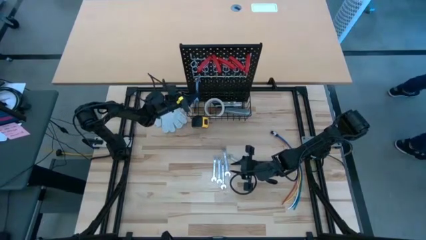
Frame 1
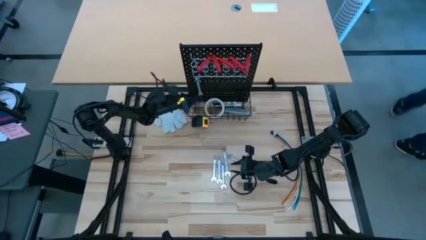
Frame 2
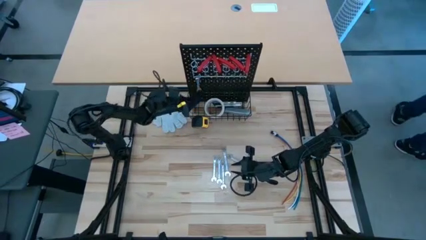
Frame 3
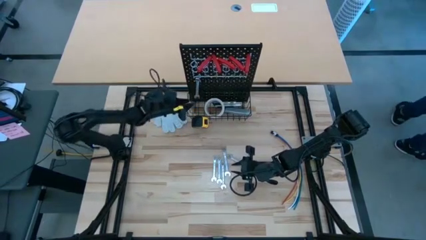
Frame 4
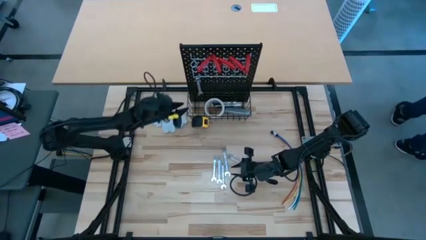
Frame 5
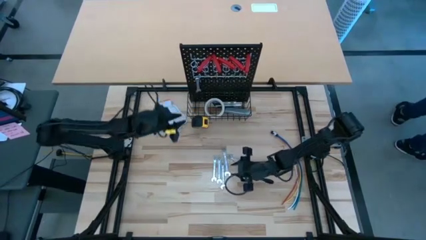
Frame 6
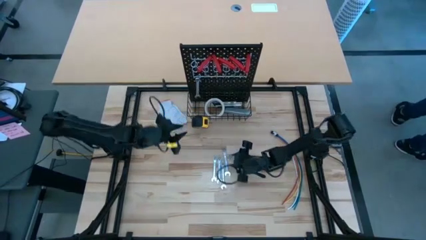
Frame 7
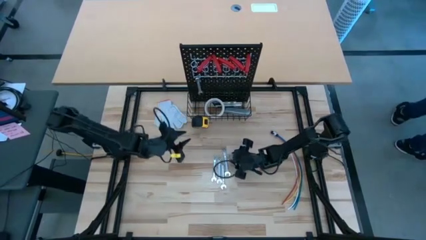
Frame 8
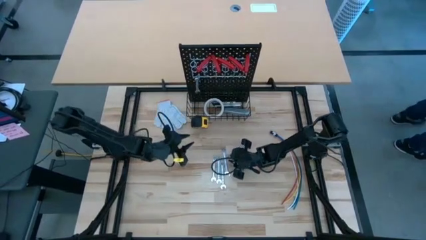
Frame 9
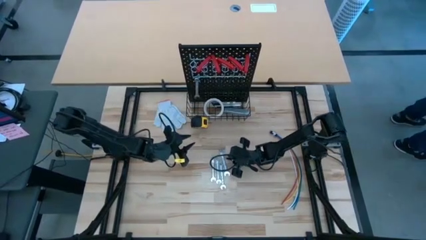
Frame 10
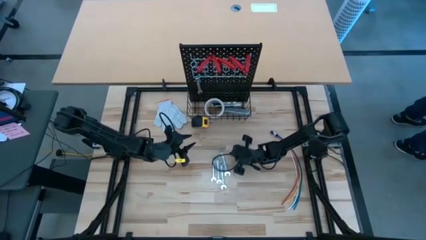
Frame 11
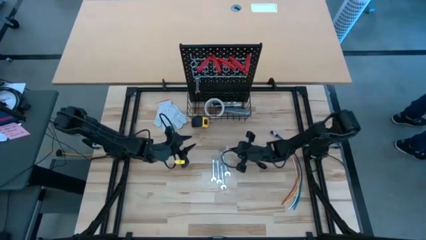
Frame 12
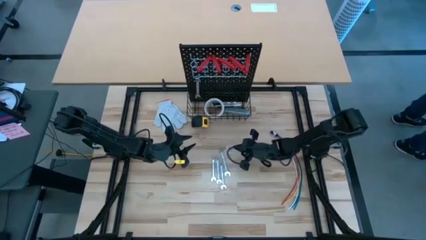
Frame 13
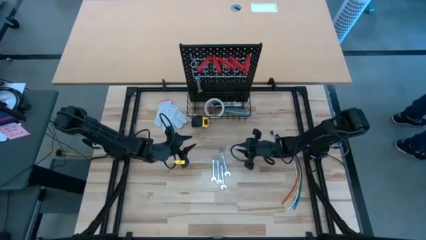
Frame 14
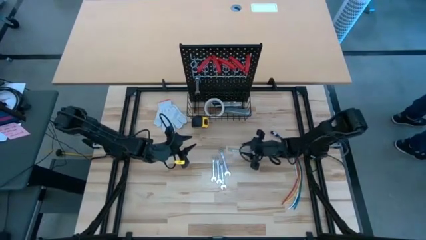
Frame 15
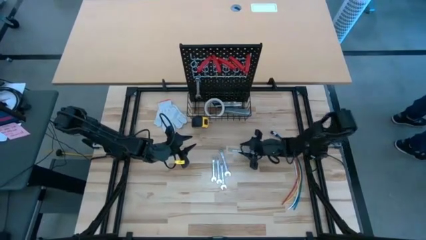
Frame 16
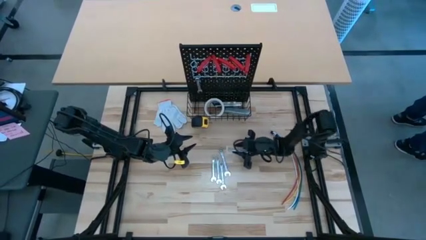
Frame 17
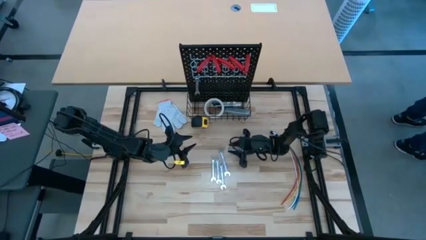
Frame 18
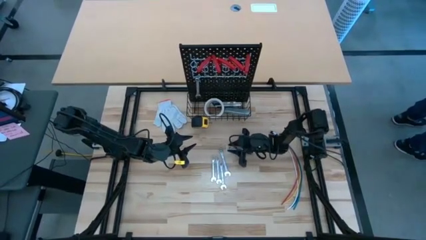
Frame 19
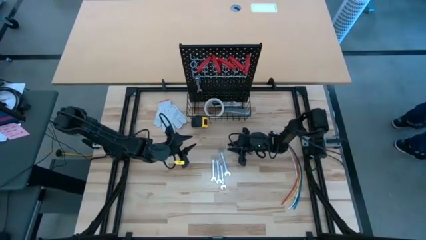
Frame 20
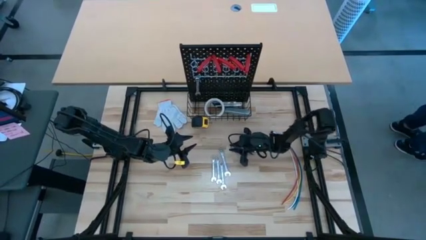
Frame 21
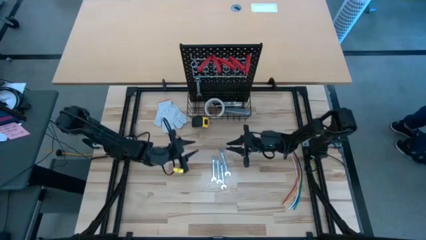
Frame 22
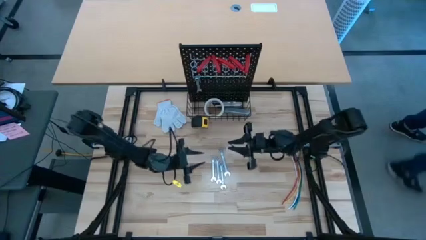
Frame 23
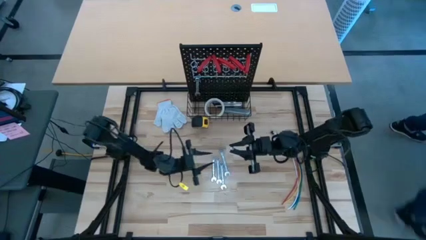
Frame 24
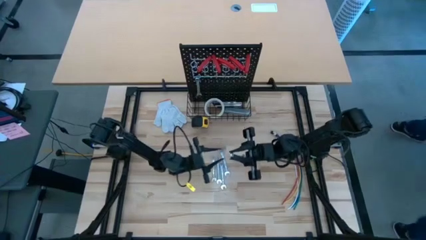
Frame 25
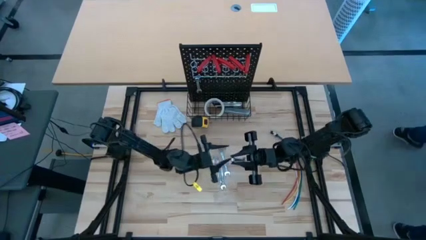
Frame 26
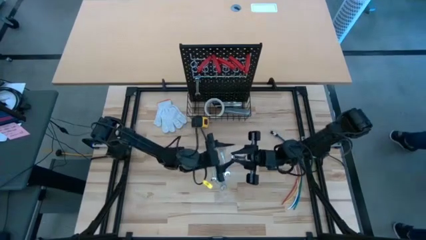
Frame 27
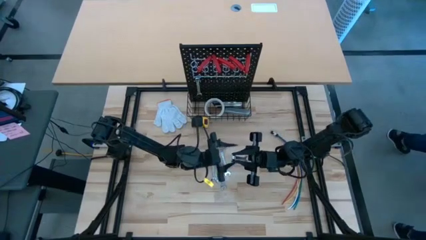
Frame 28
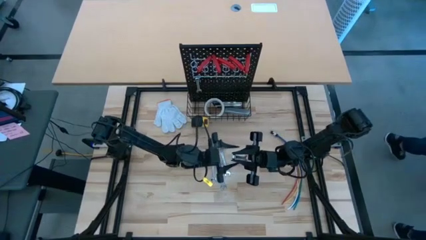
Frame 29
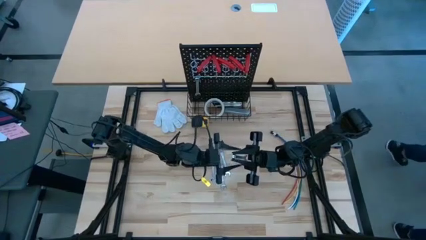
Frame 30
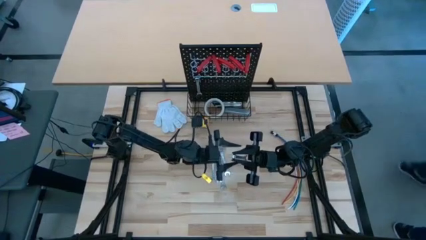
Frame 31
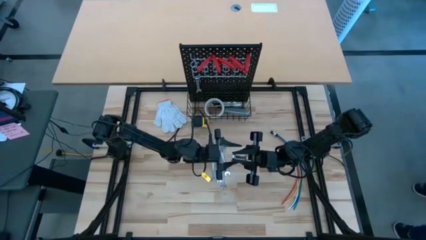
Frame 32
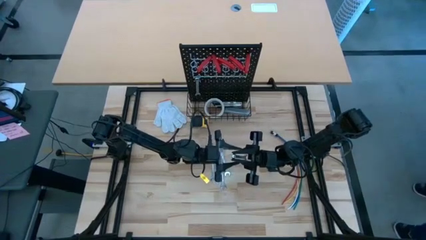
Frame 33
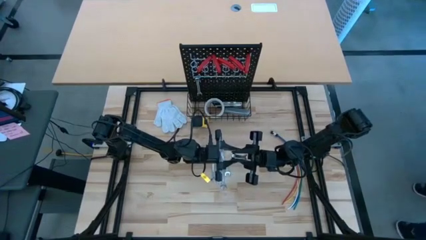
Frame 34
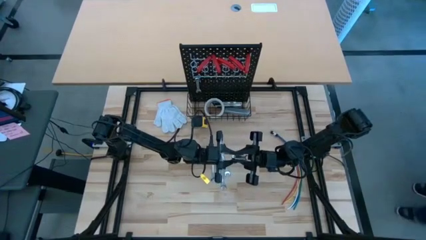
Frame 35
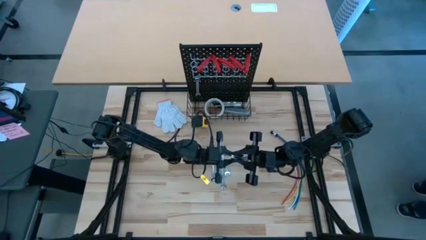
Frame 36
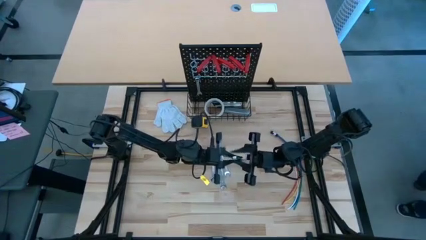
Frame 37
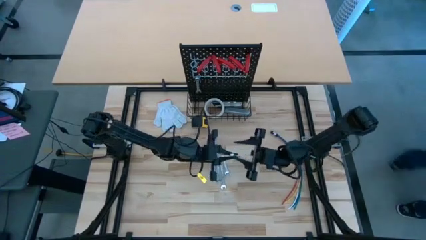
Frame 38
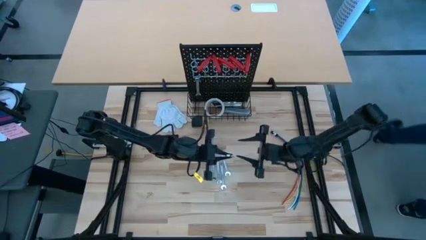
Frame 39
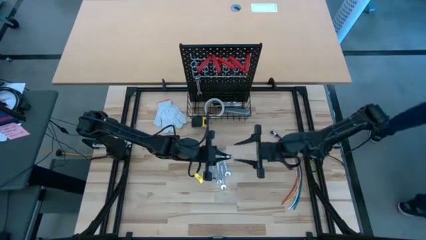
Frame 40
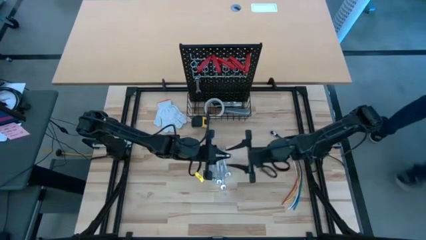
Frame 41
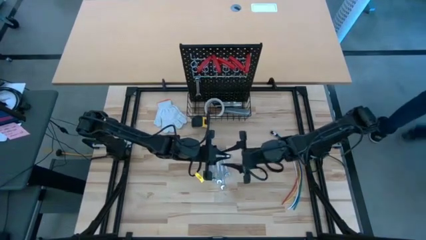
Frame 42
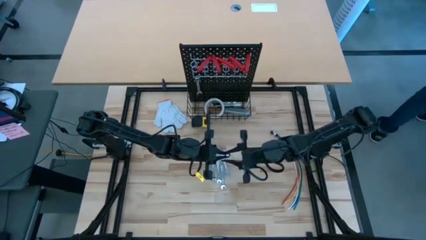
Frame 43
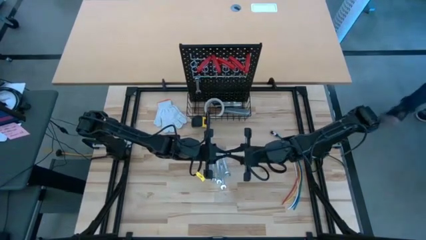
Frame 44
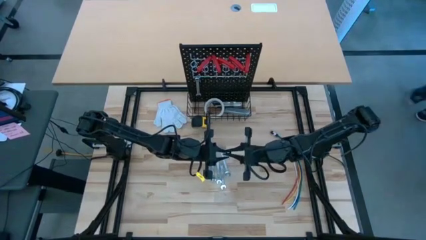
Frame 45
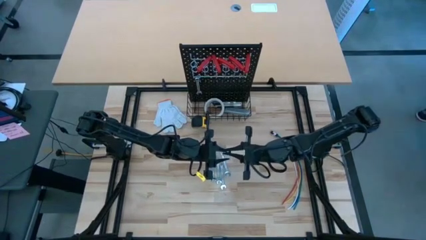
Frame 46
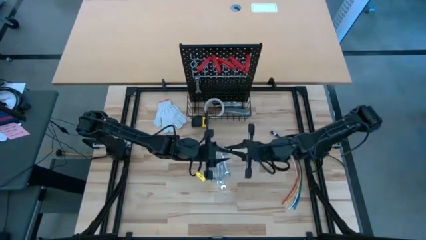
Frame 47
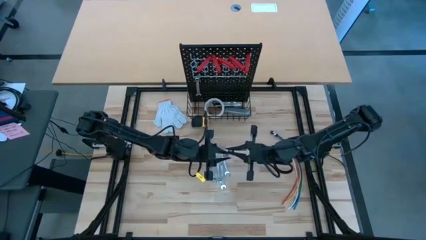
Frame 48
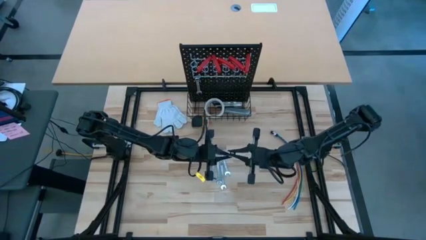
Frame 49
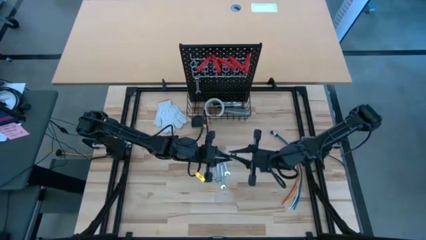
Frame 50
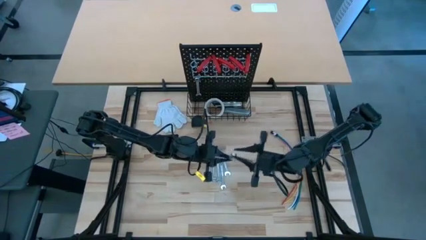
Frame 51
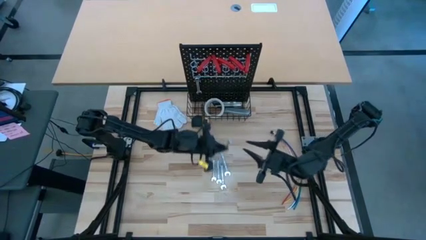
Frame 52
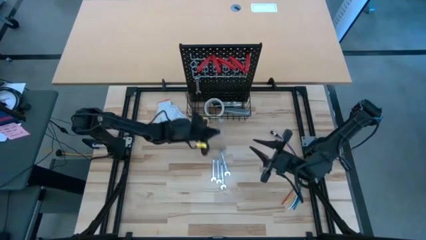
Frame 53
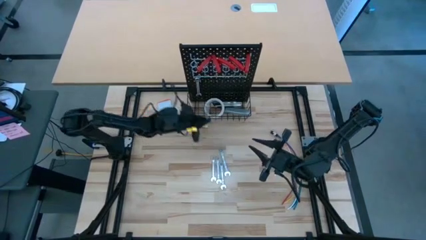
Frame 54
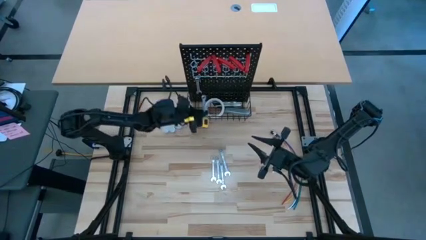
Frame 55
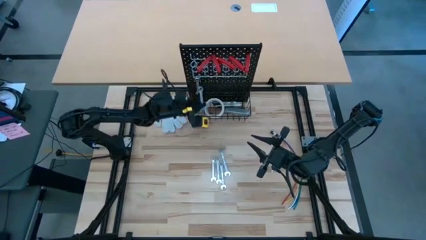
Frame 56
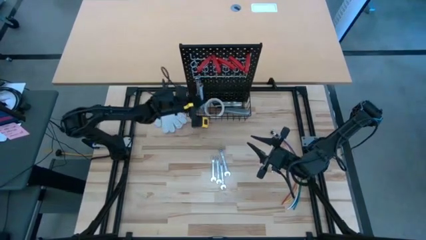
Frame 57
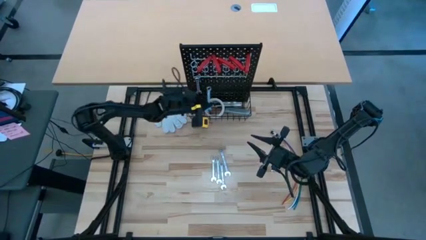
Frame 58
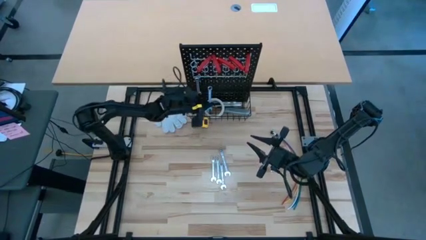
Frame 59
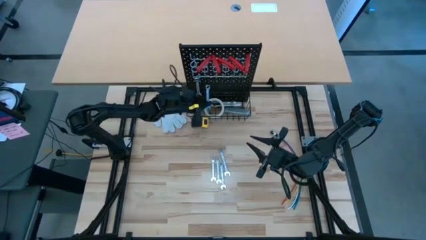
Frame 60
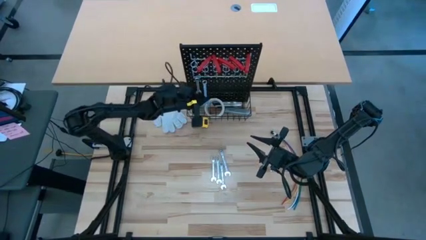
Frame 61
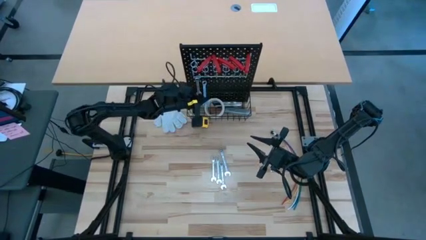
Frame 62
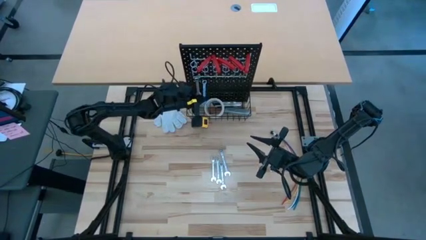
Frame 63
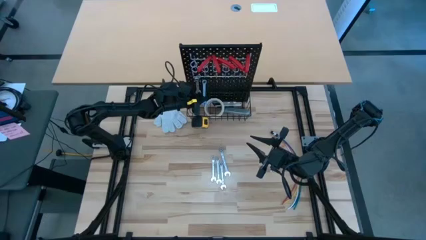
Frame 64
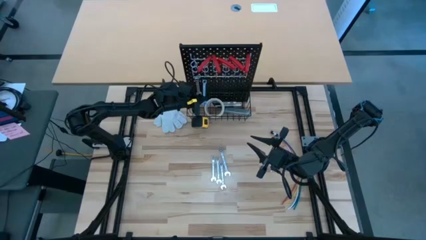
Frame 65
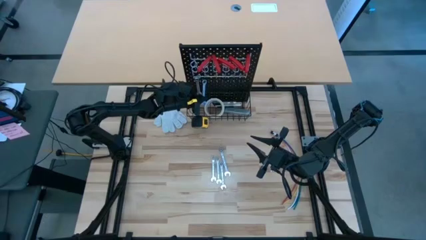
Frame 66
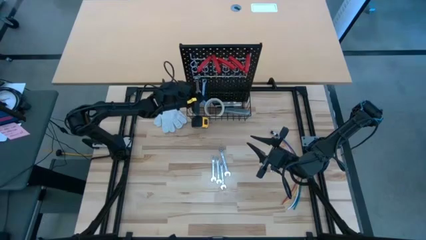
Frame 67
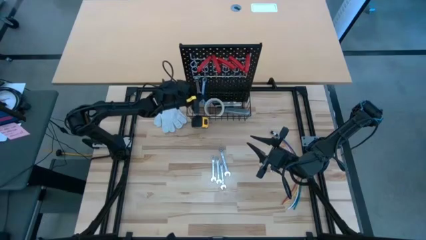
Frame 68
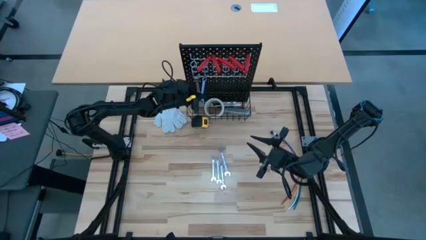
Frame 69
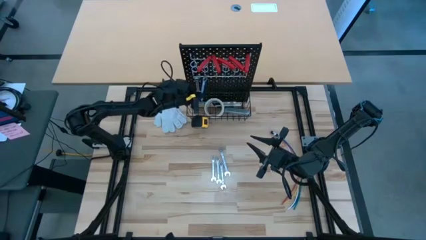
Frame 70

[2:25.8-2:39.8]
Task: Hang tools onto peg board
Hang the silver wrench on the pegboard
